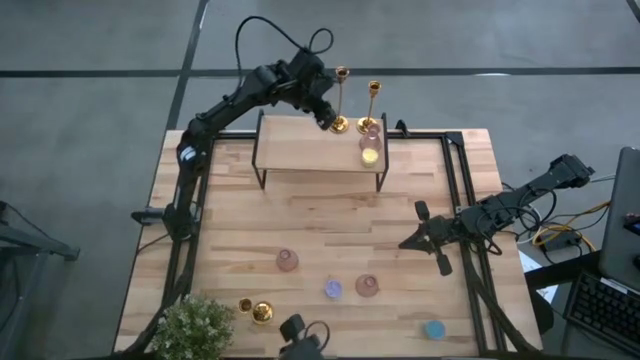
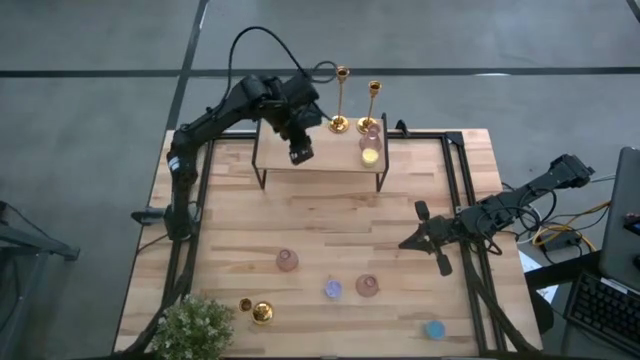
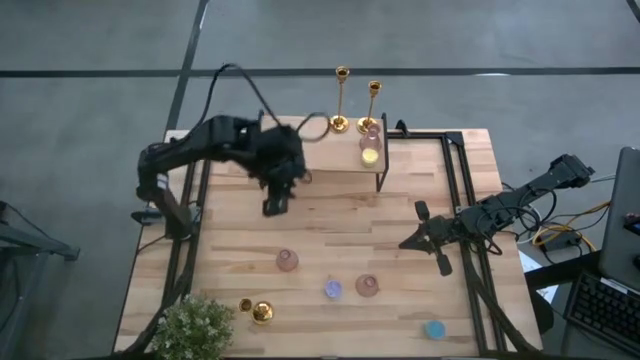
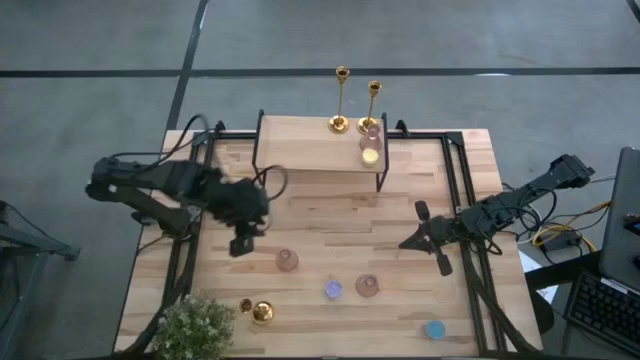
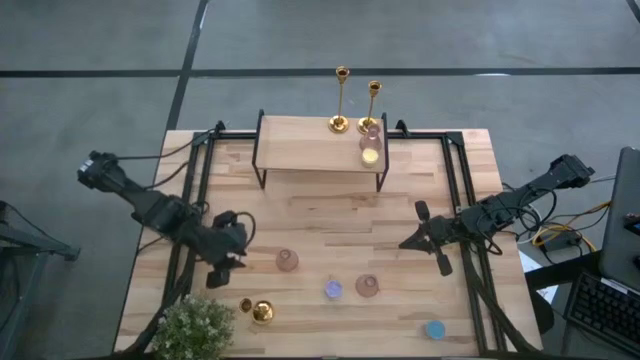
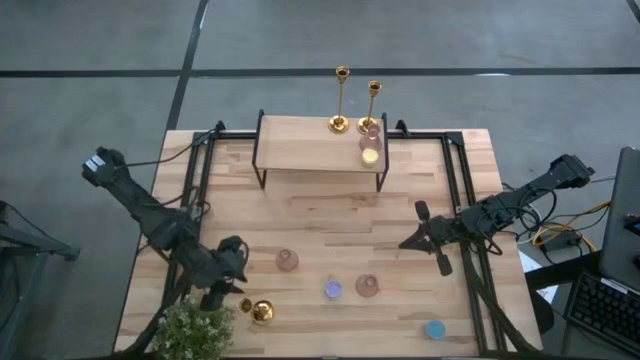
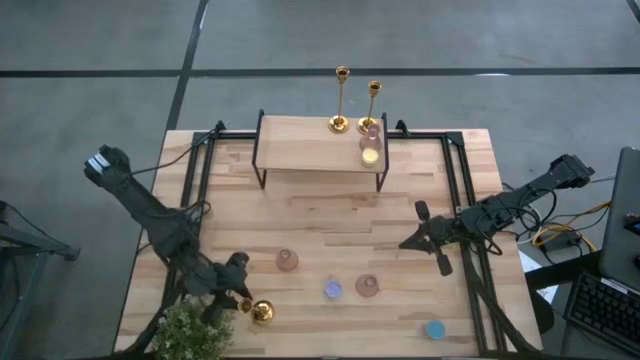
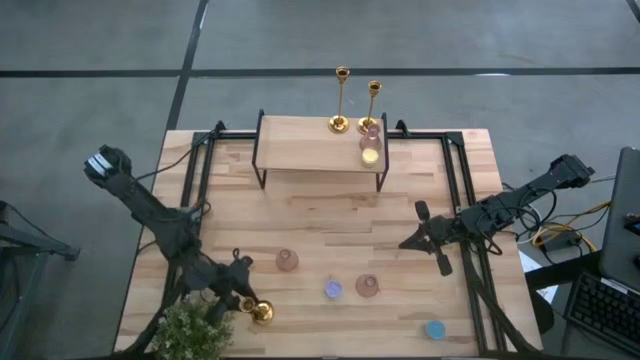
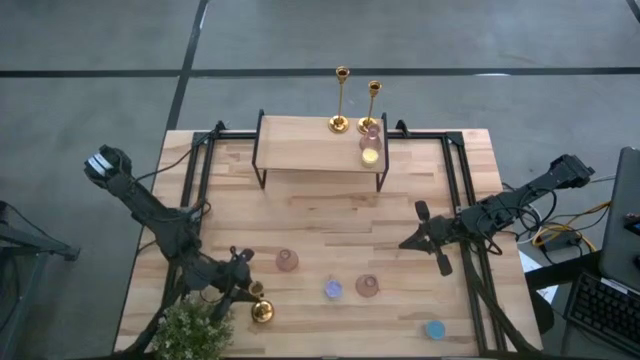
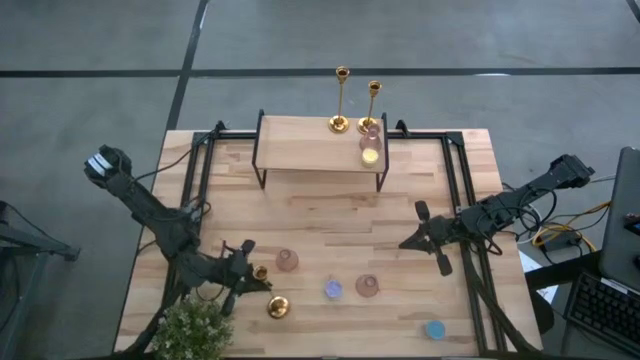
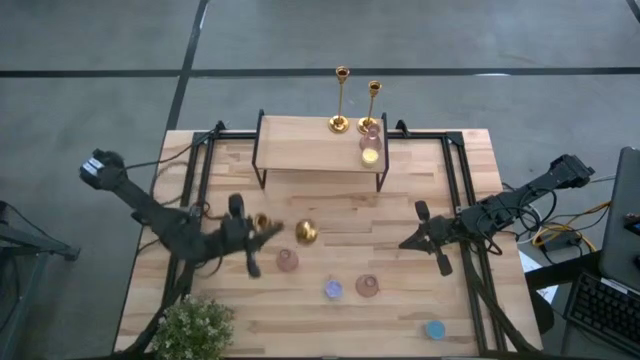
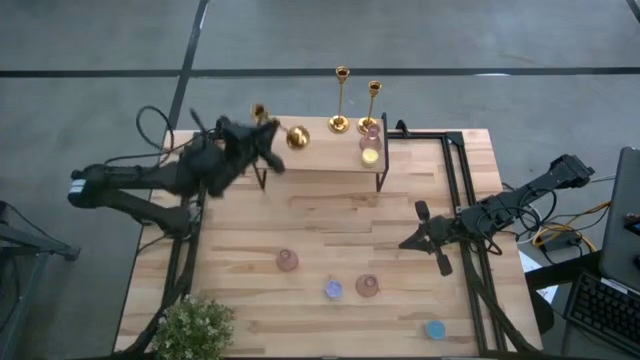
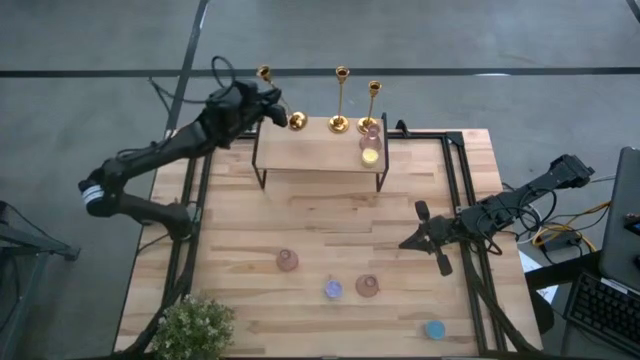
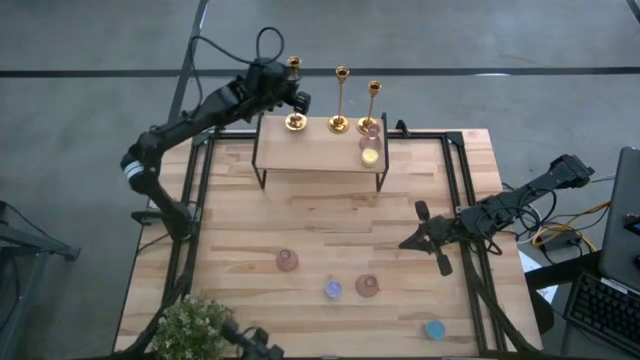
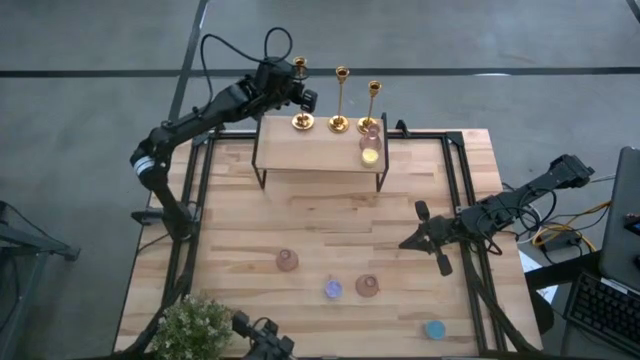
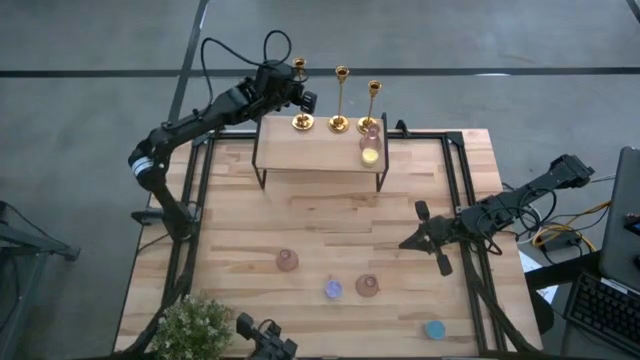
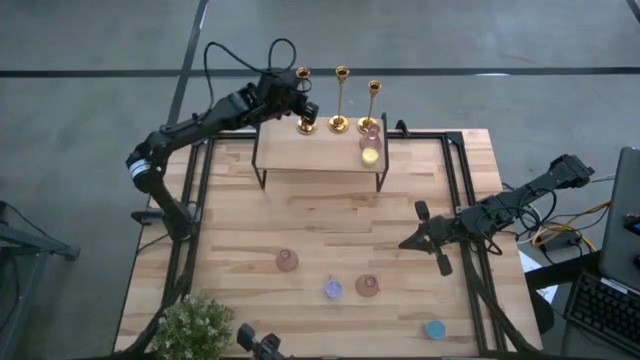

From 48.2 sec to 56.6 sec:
Task: Pick & Place candle stick holders
Put the gold candle holder on the shelf aligned with the other gold candle holders

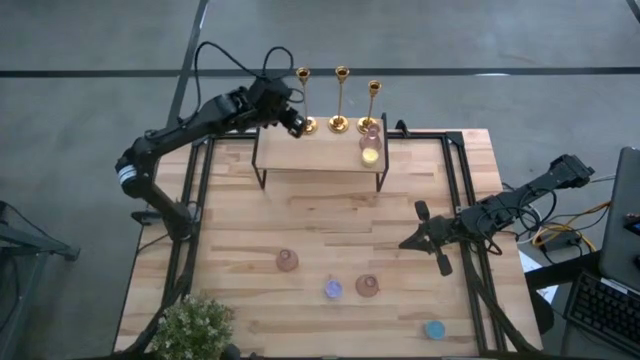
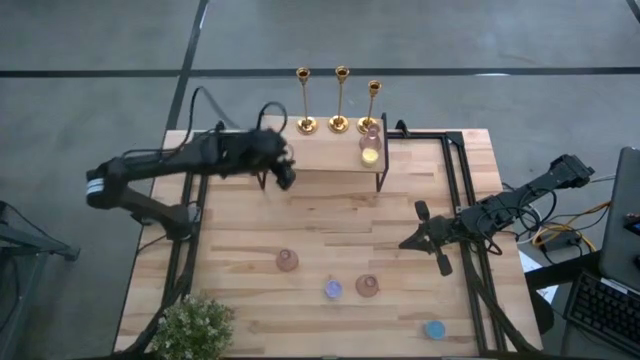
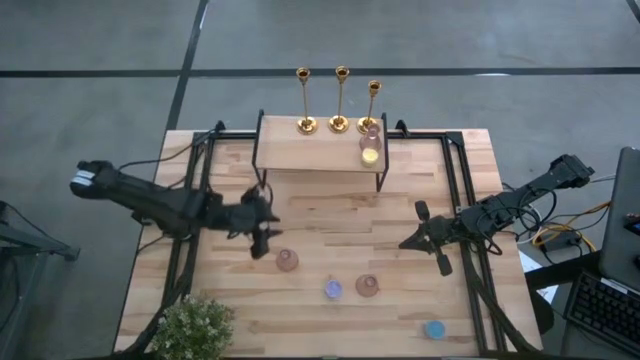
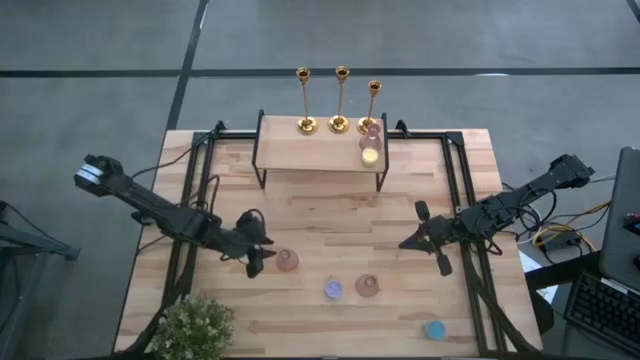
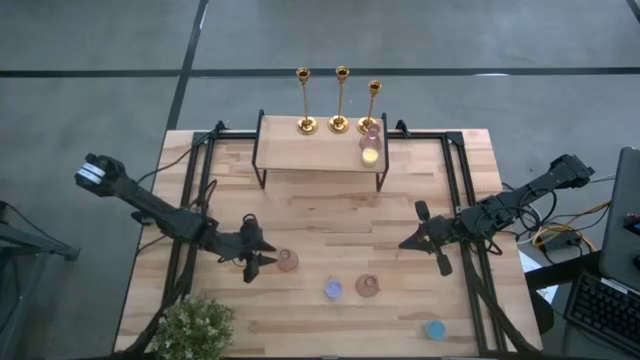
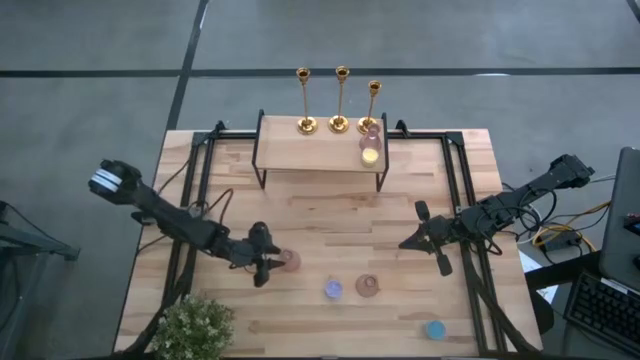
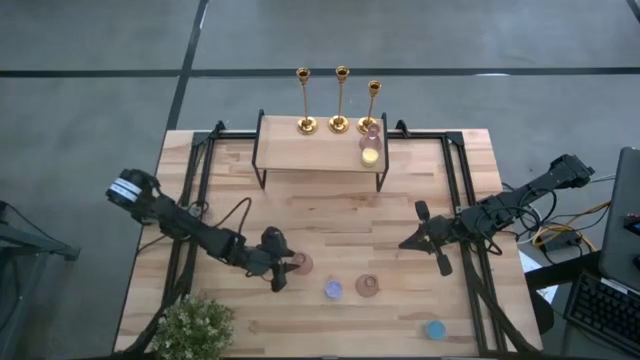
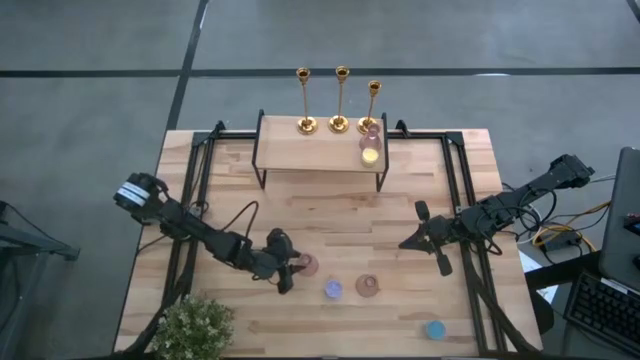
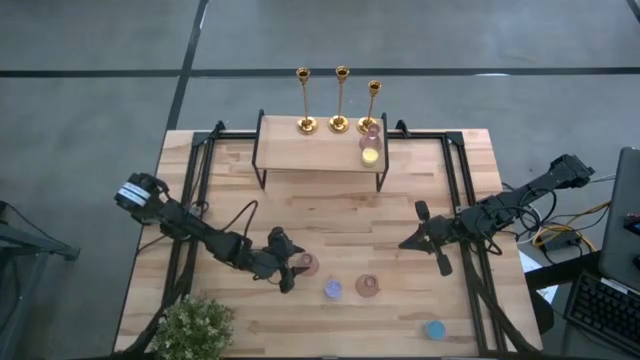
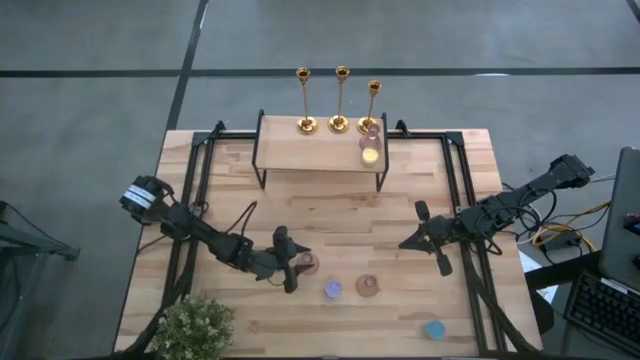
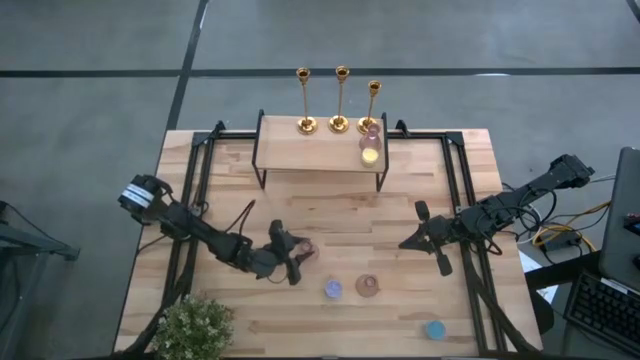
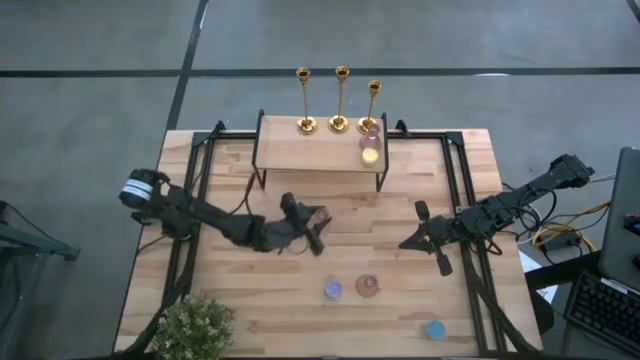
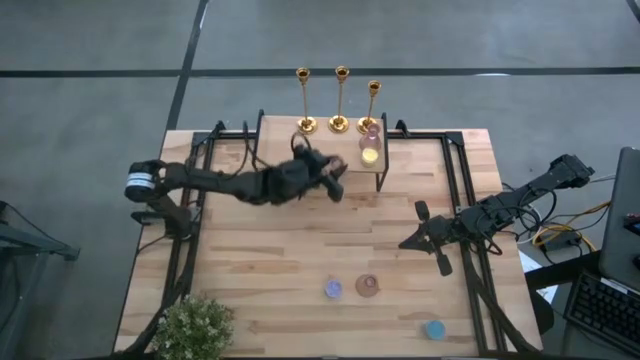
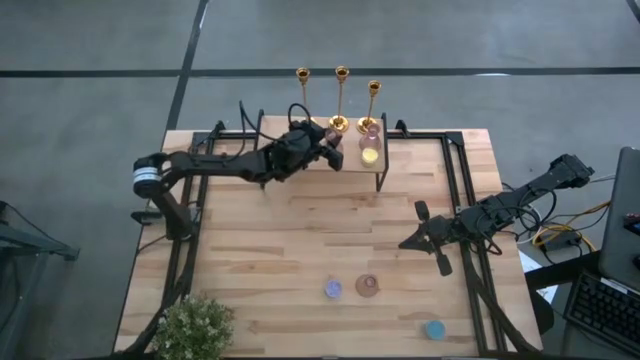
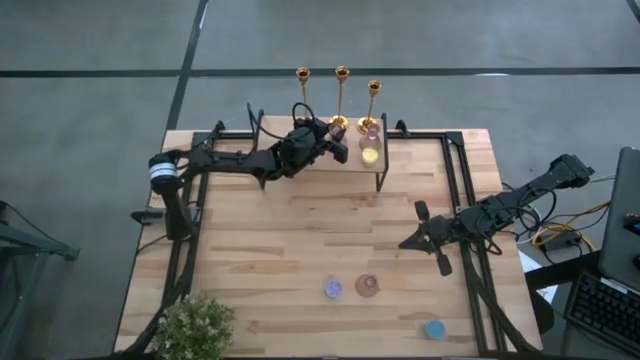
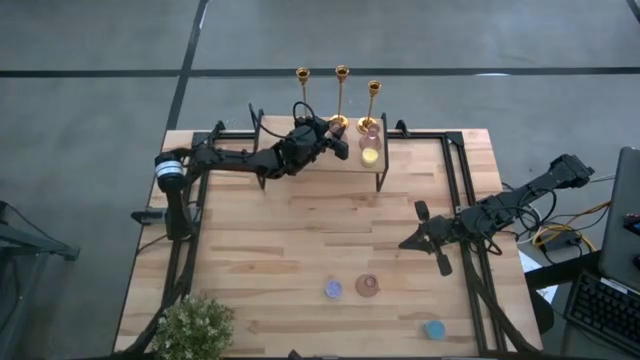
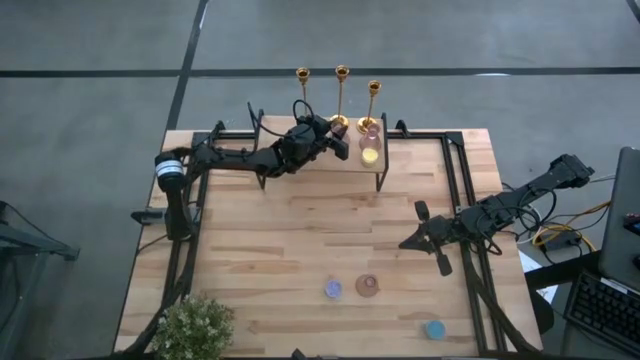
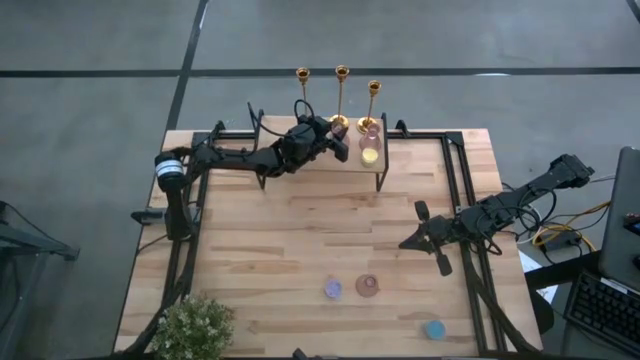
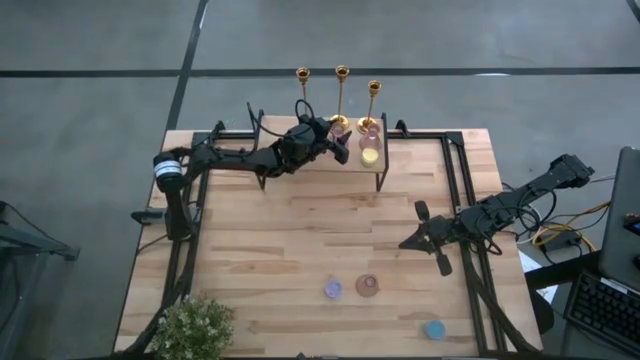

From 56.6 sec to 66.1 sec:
Put the left purple candle holder on the shelf aligned with the other purple candle holder

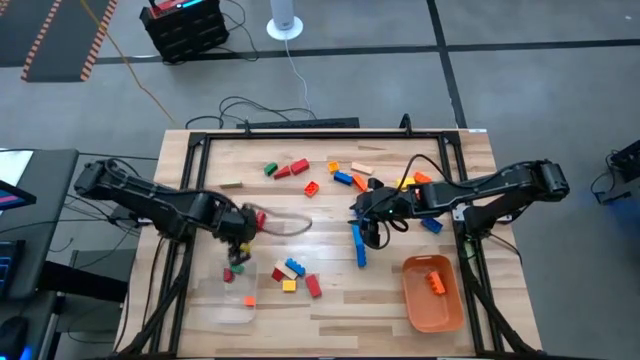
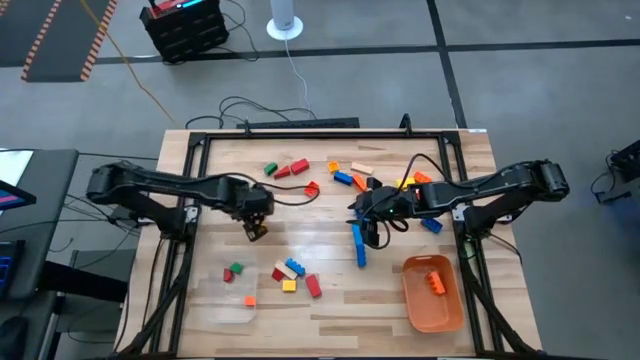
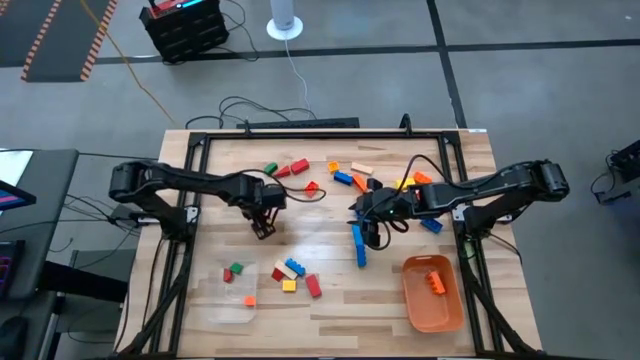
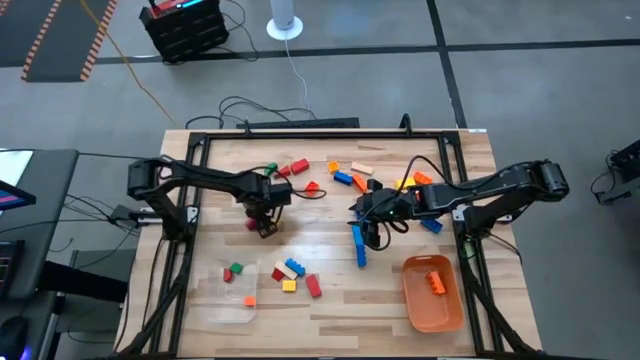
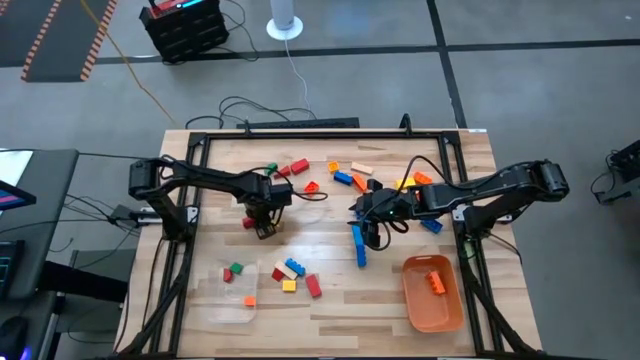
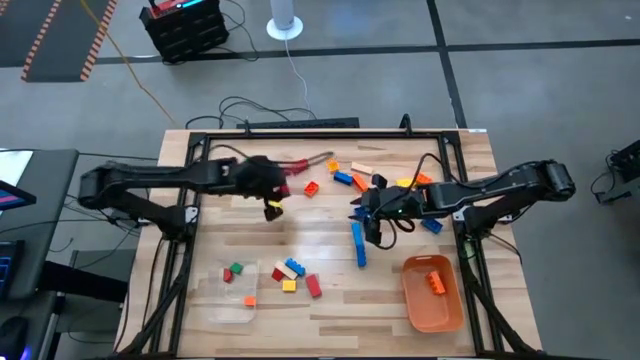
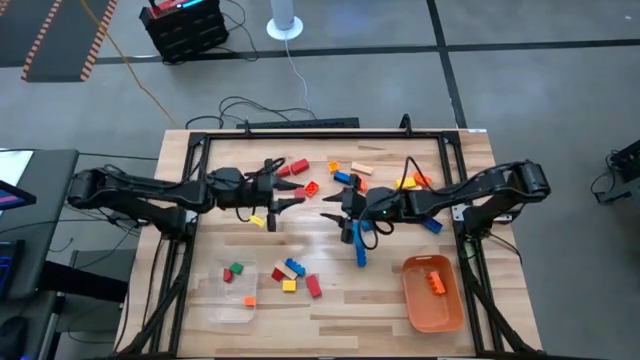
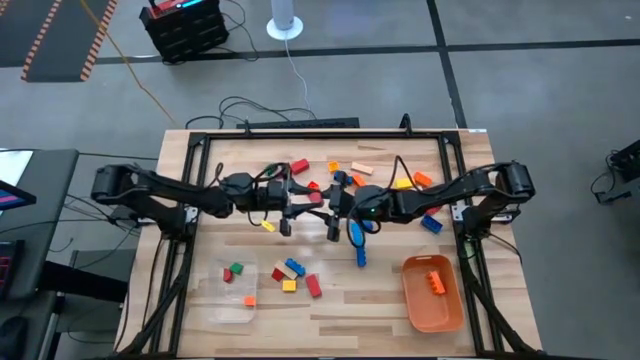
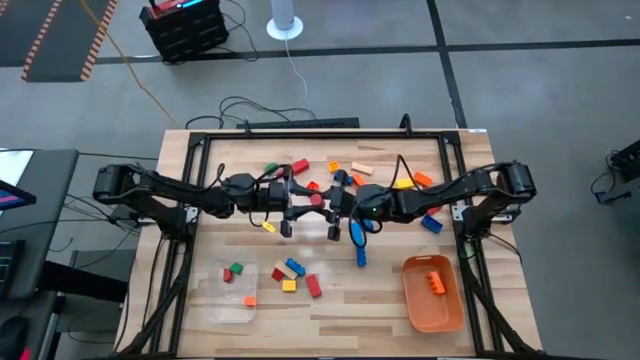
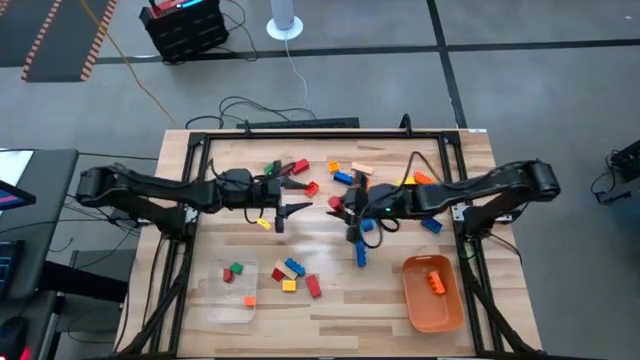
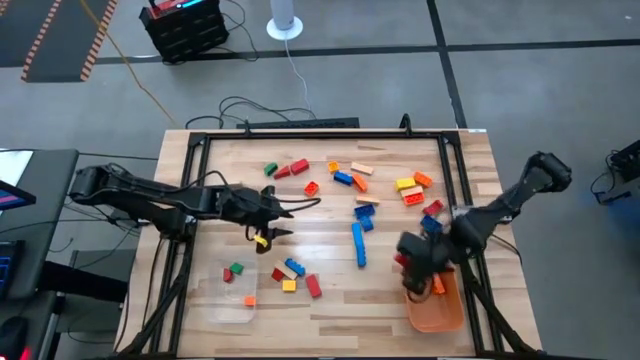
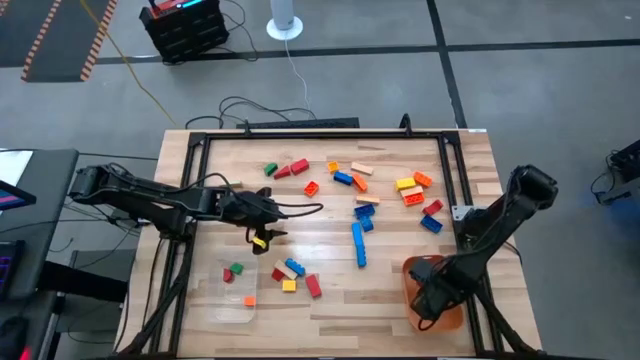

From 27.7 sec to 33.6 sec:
Task: Sort blocks by size
Put the large red block into the orange bin
